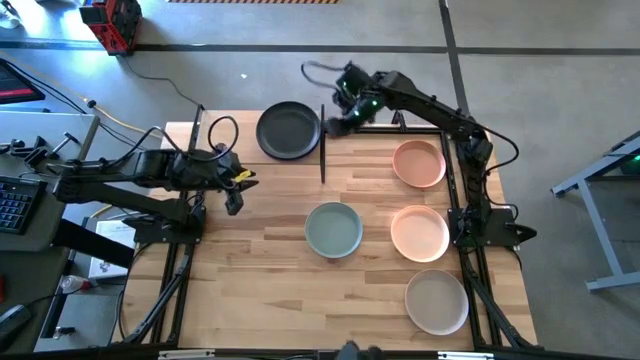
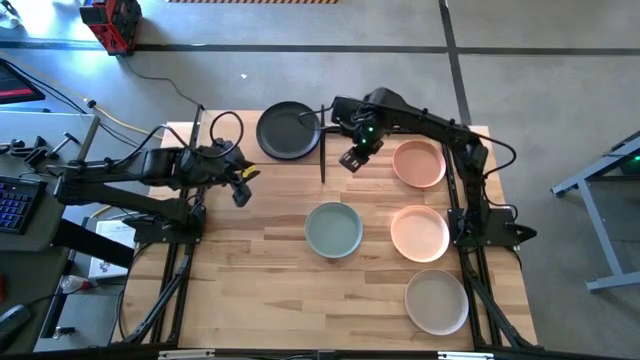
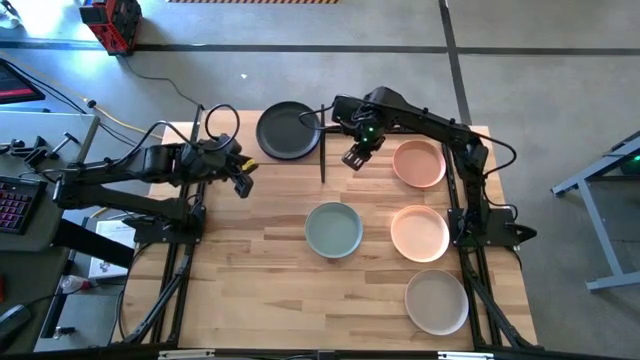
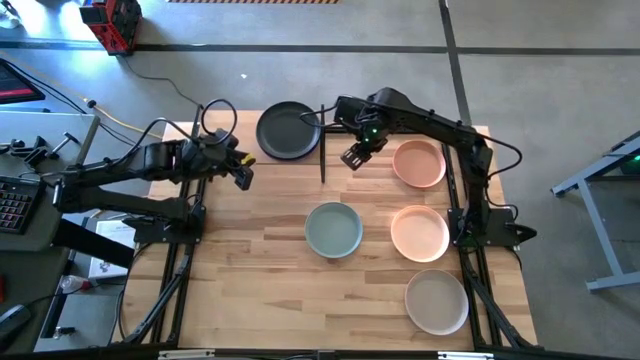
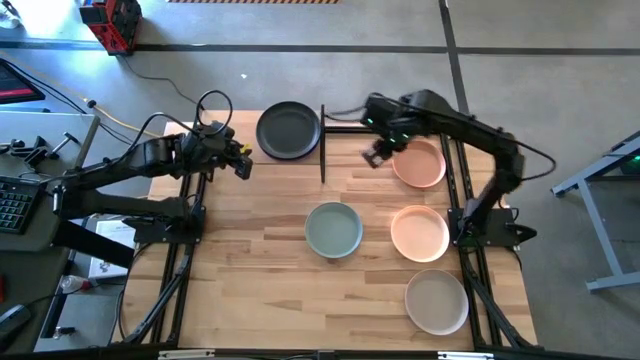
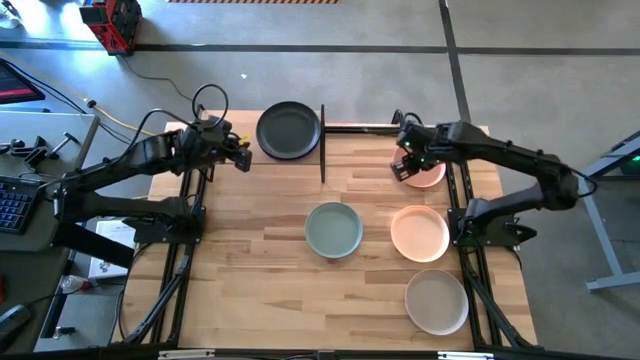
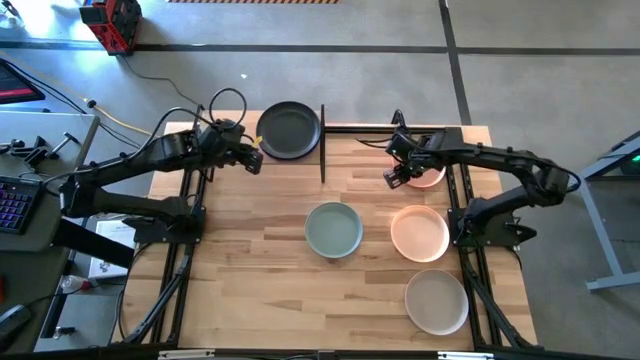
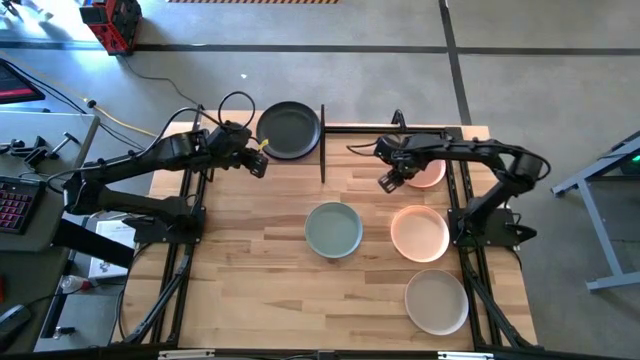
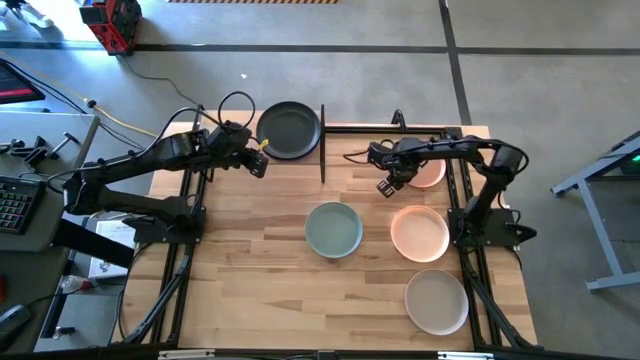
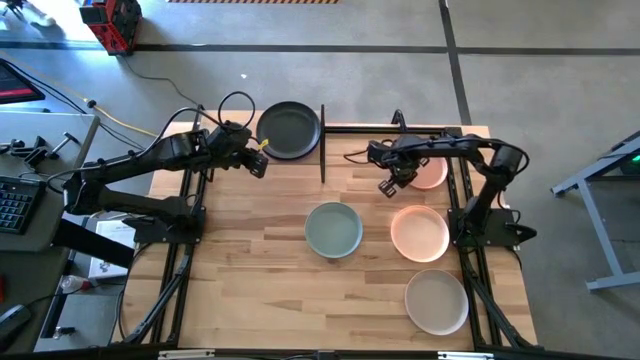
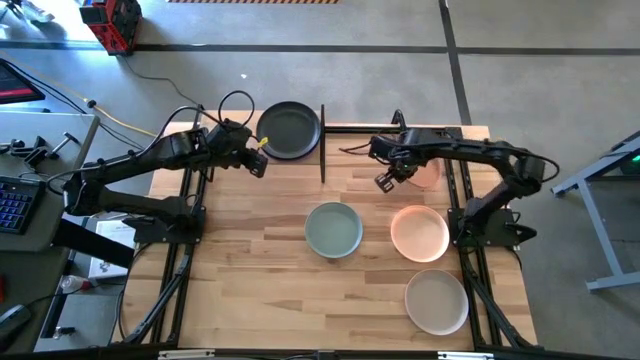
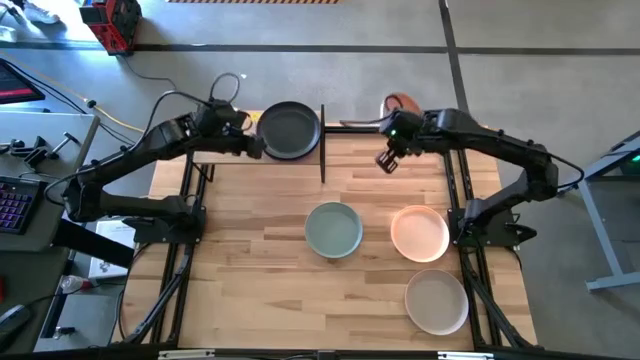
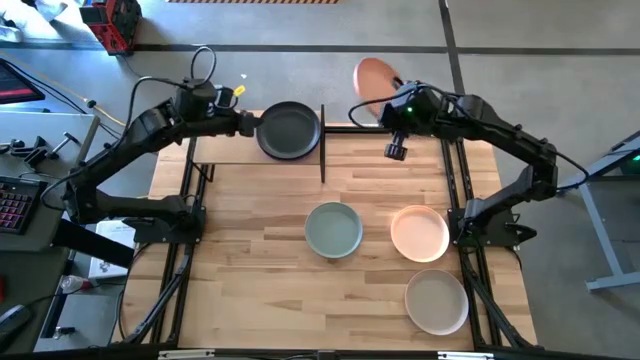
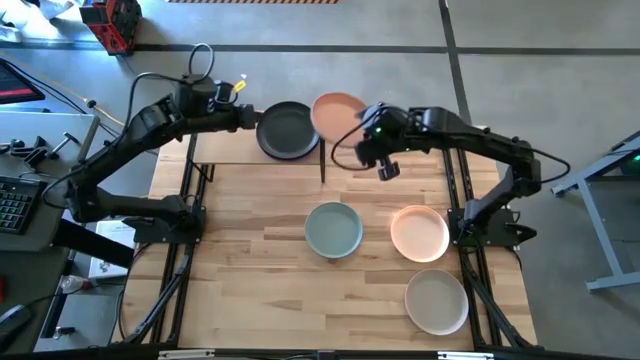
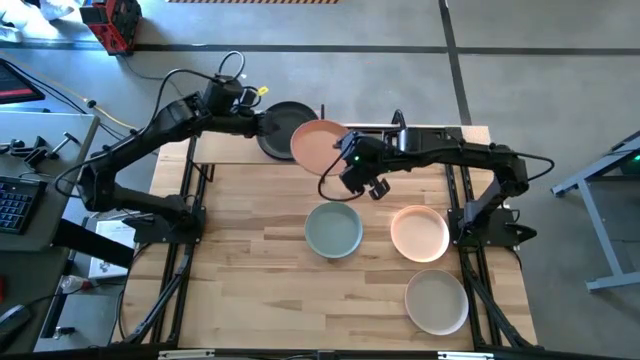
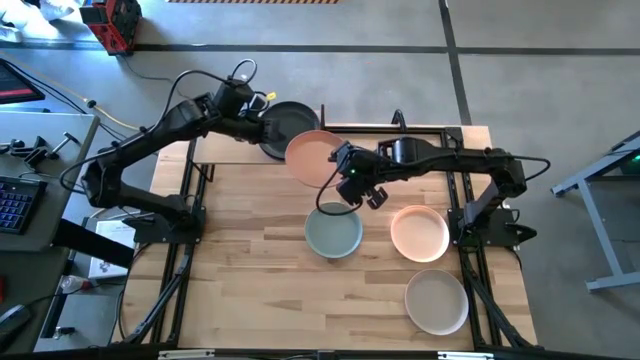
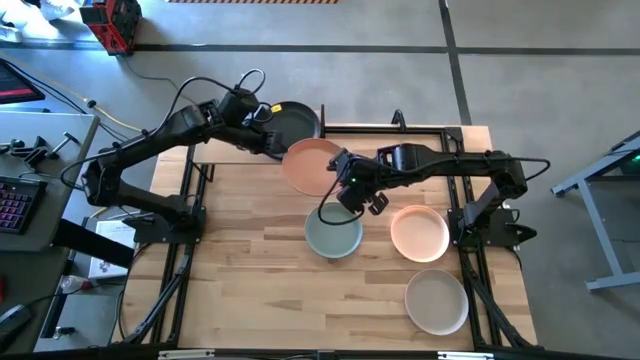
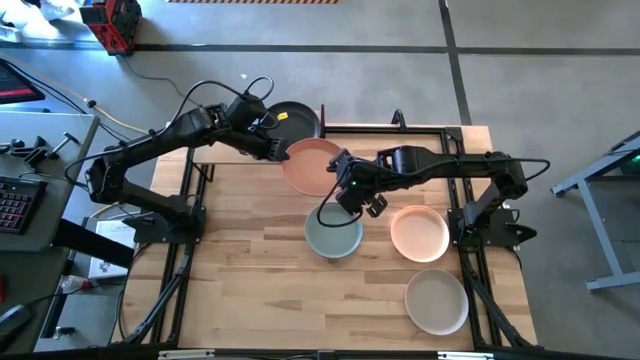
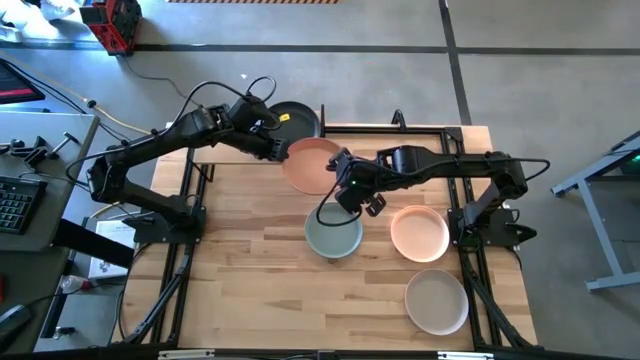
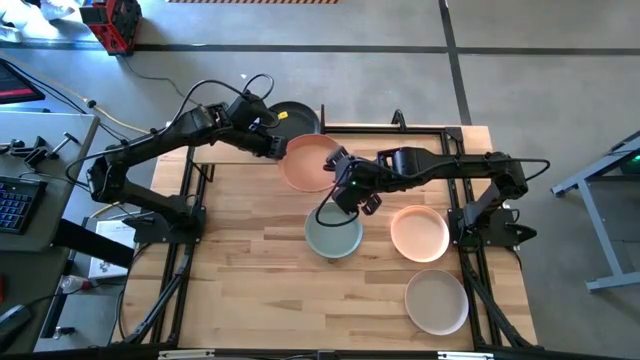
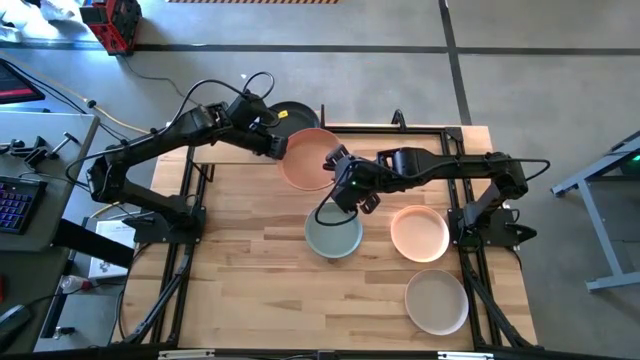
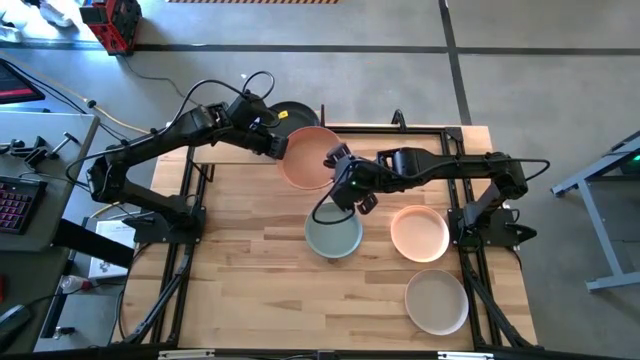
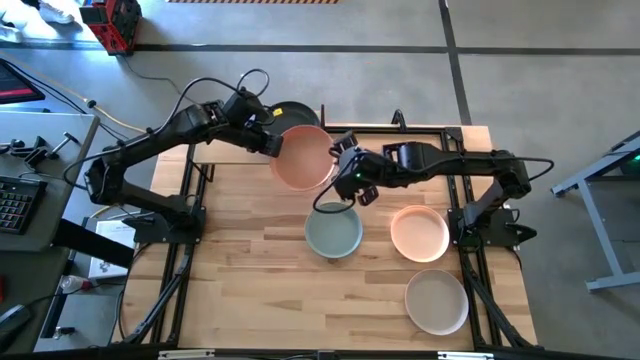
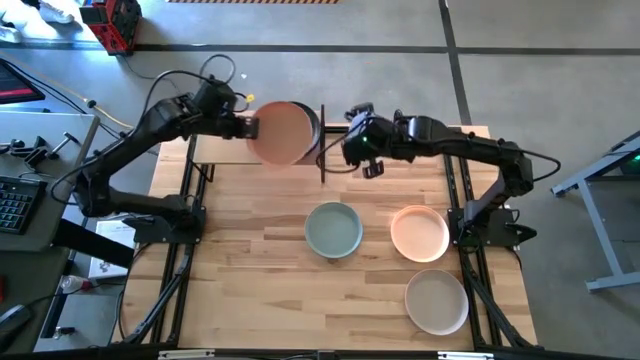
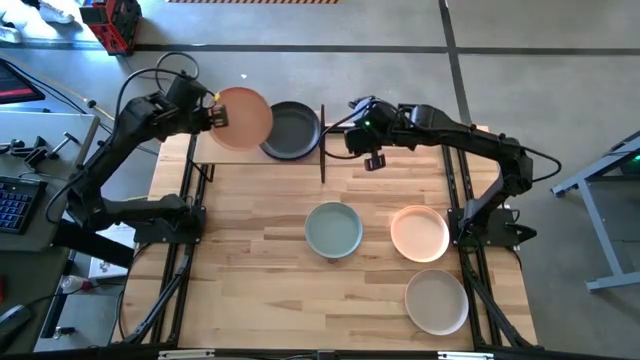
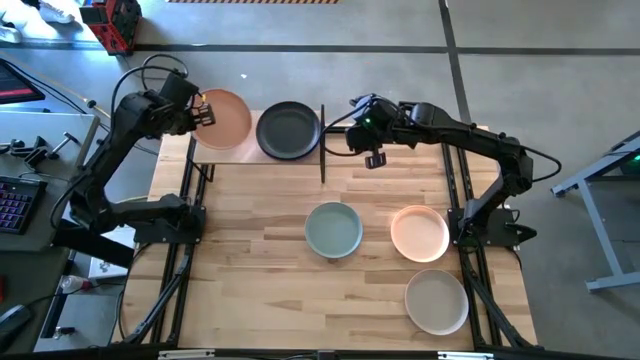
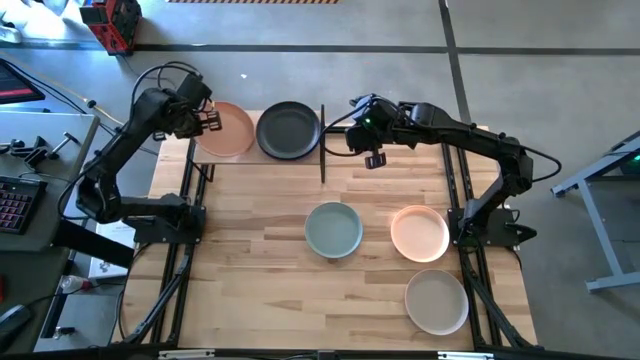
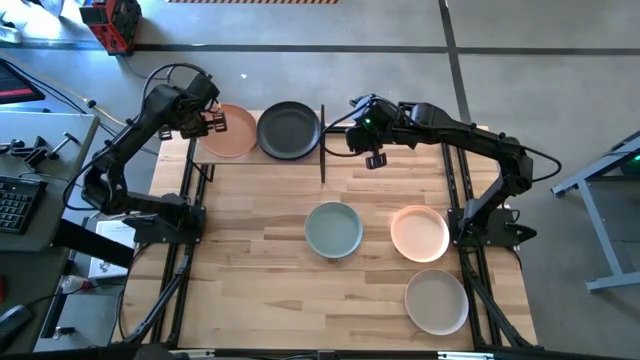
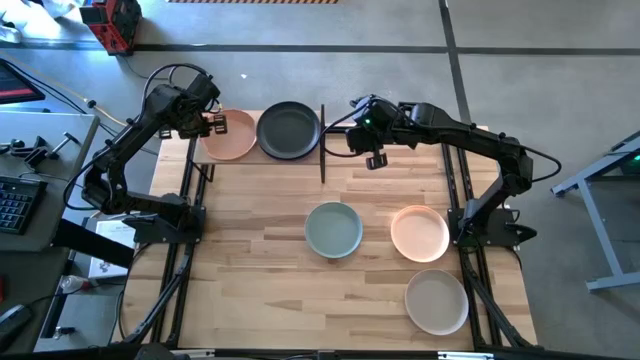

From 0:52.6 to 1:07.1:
Task: Place and stack plates onto a shelf
Put the orange plate on the shelf

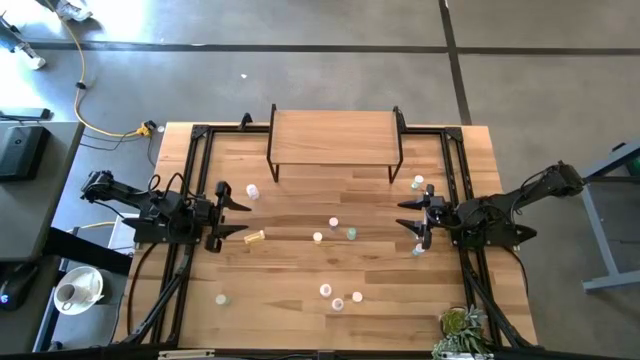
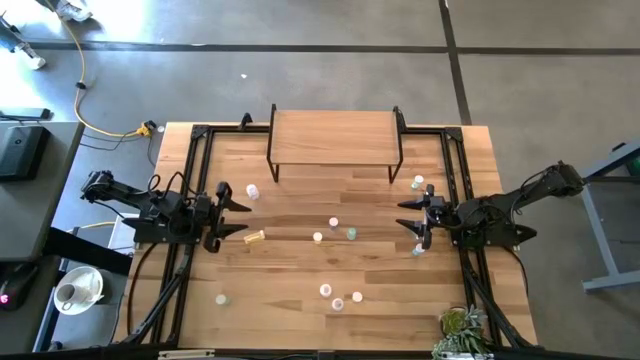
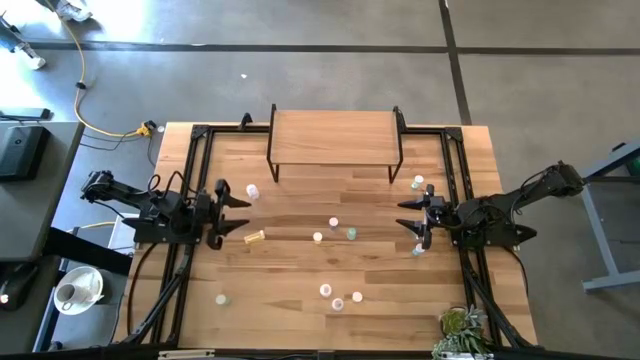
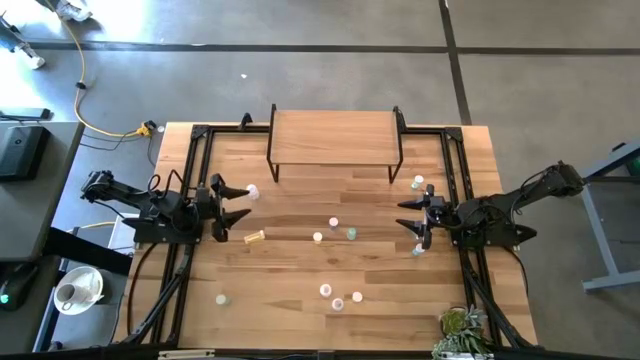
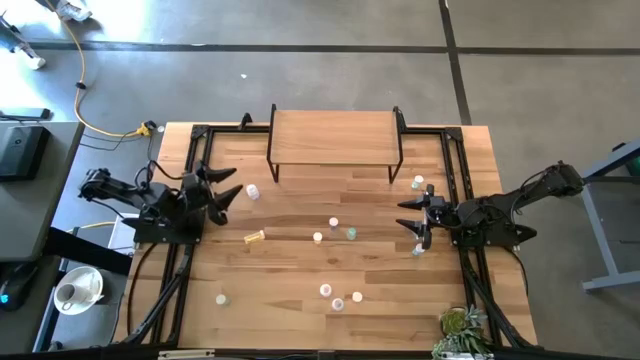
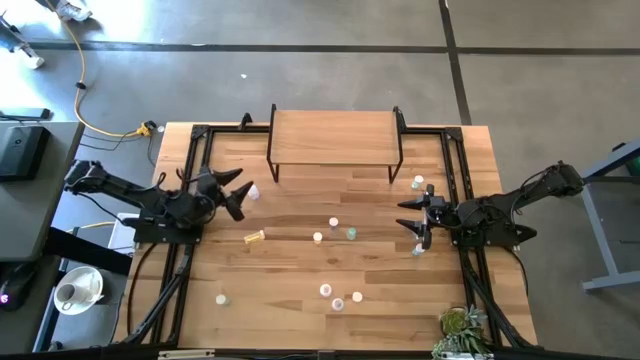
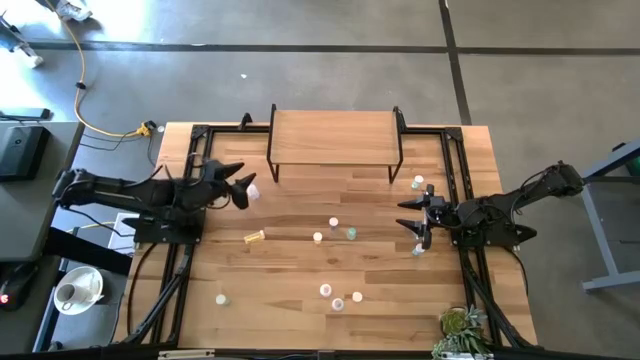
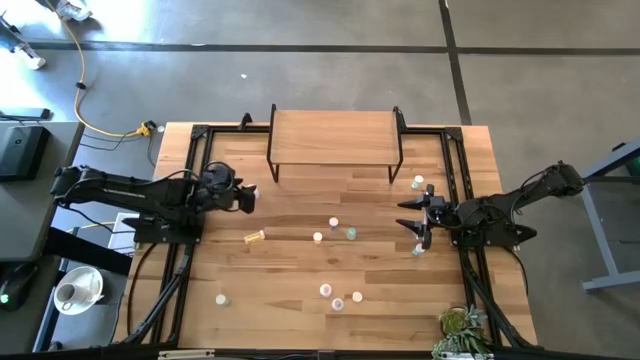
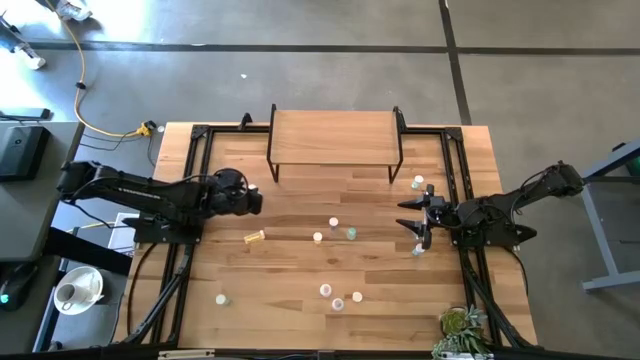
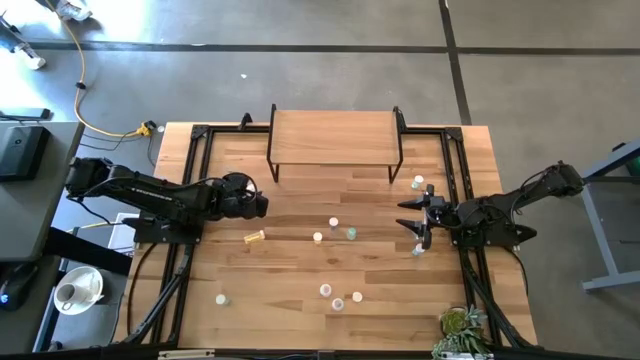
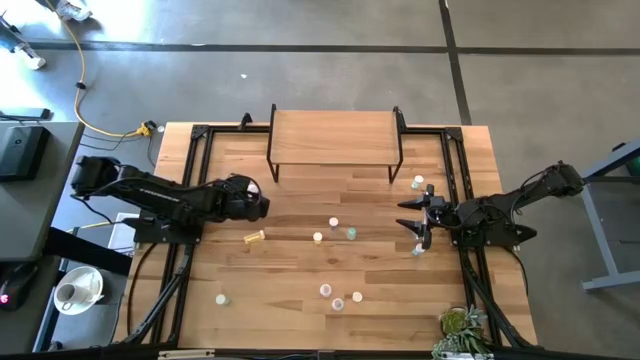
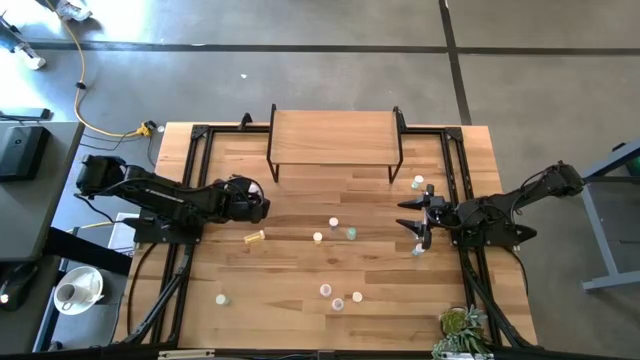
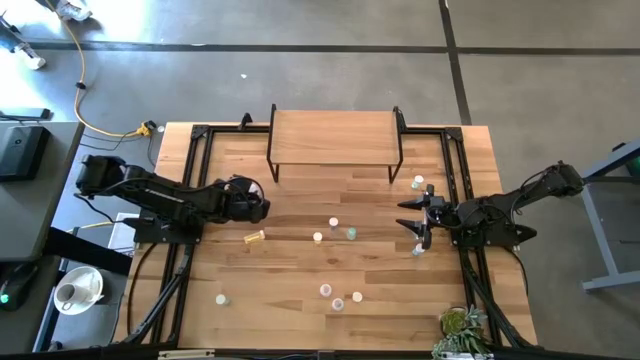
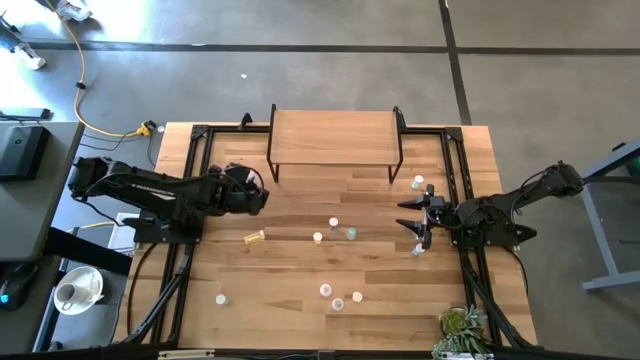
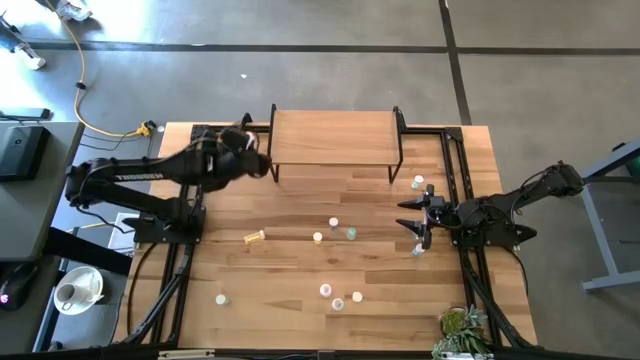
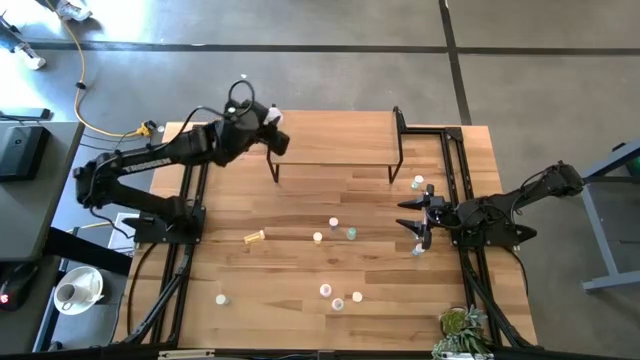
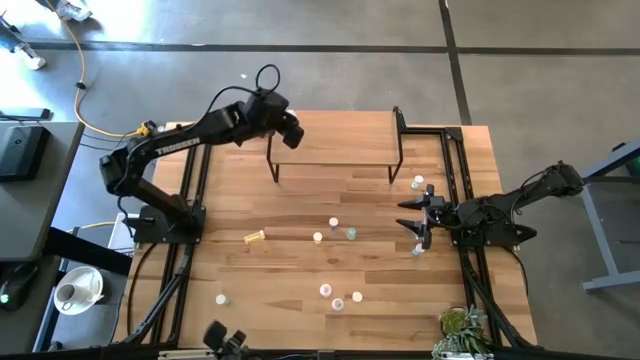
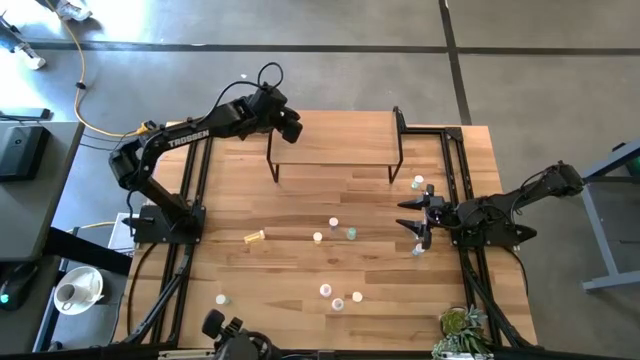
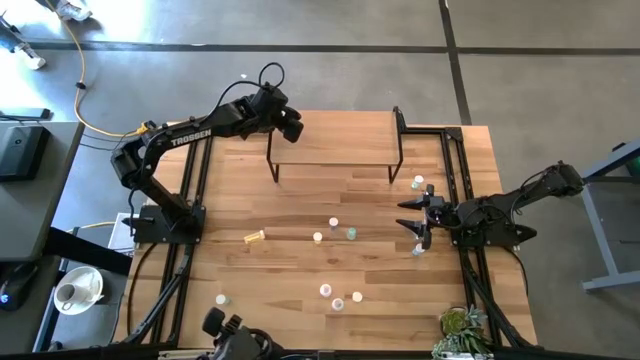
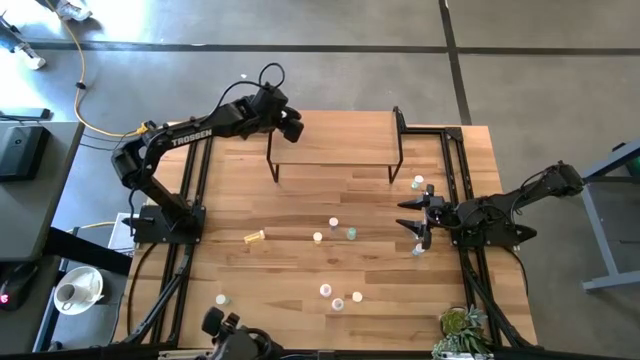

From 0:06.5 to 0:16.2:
Task: Pick and place medicine bottles onto shelf by color
Put the top white pill bottle on the shelf
